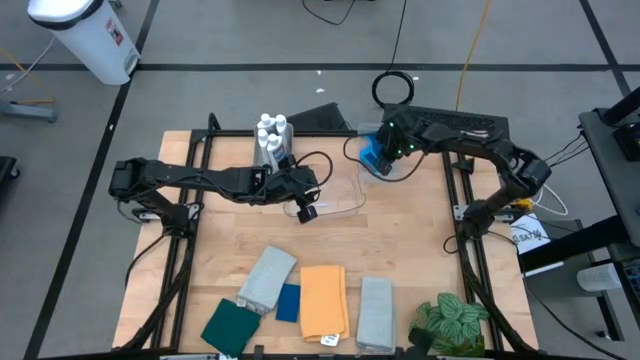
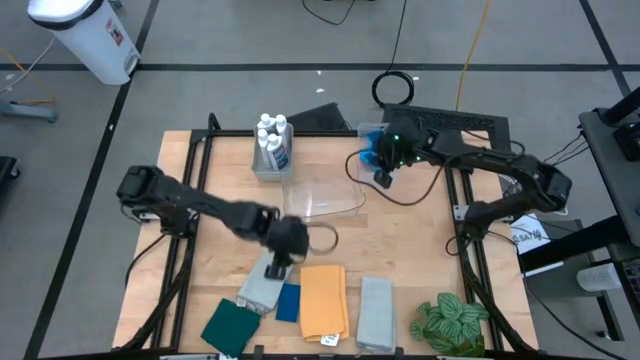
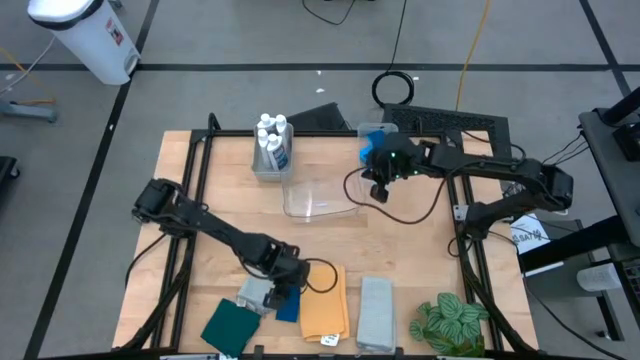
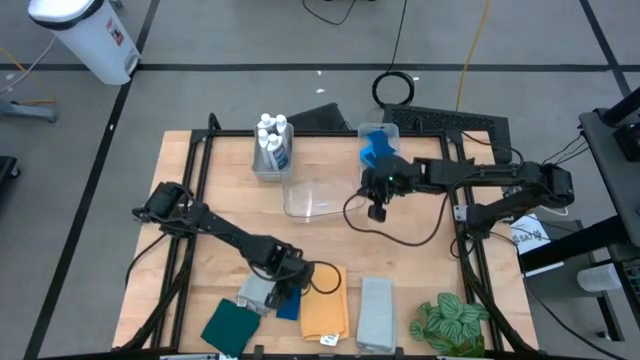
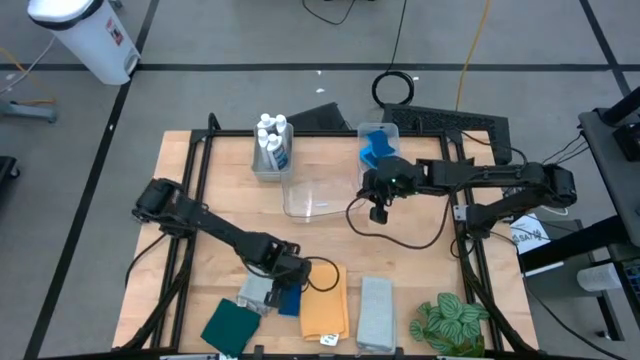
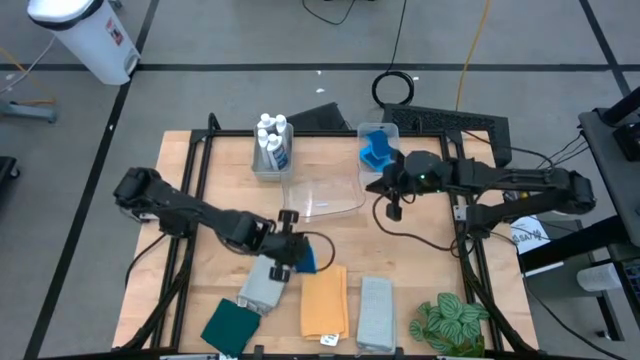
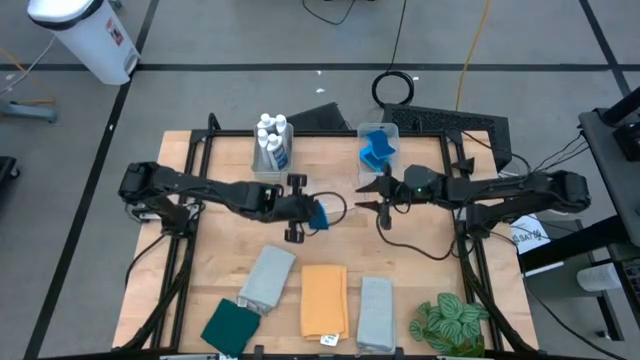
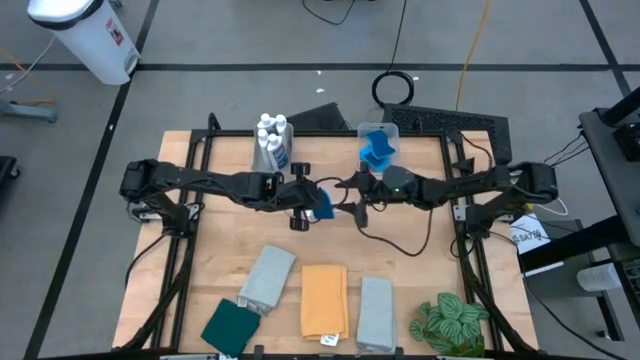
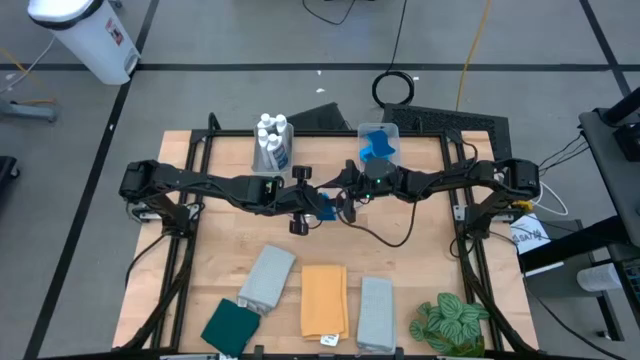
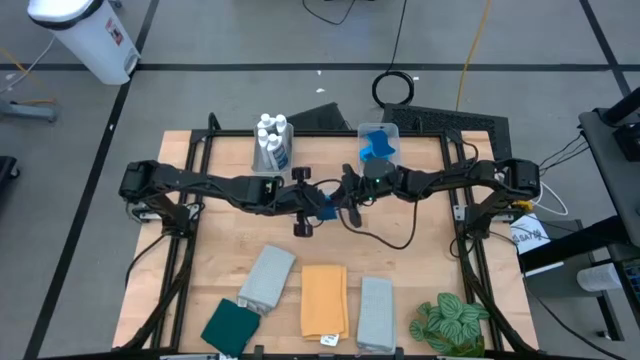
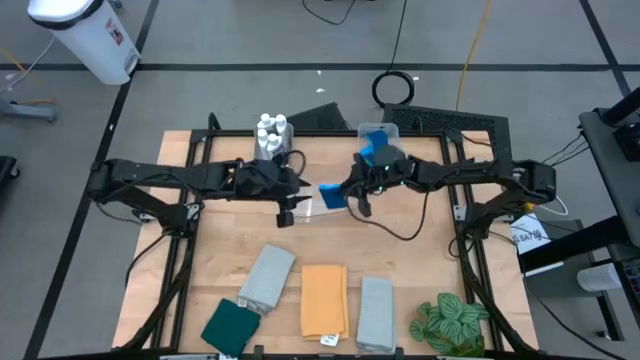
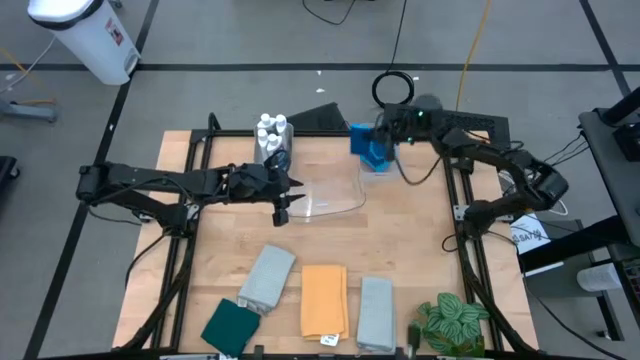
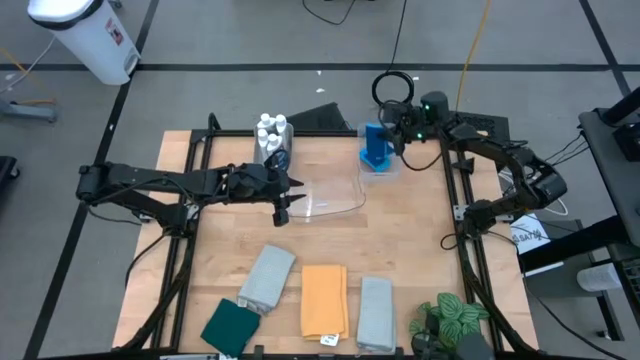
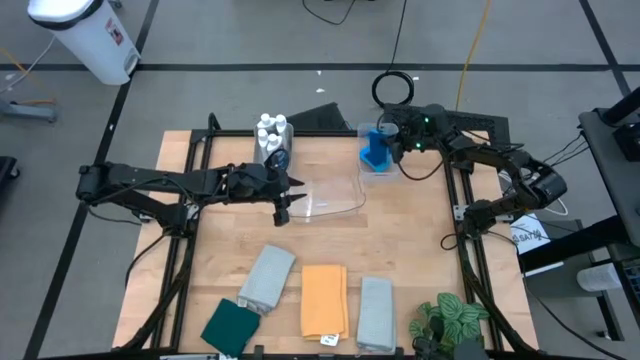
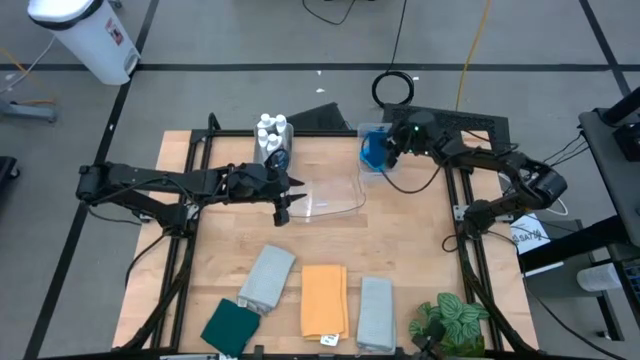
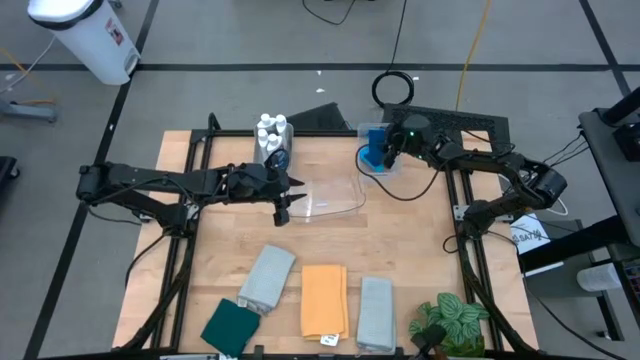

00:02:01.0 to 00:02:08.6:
Task: Pick & Place Kitchen Items
Put the blue sponge into the white bin

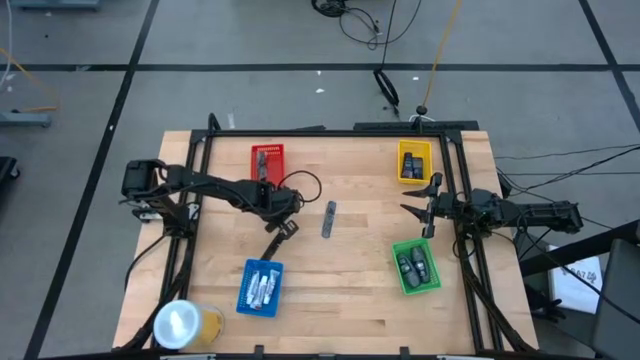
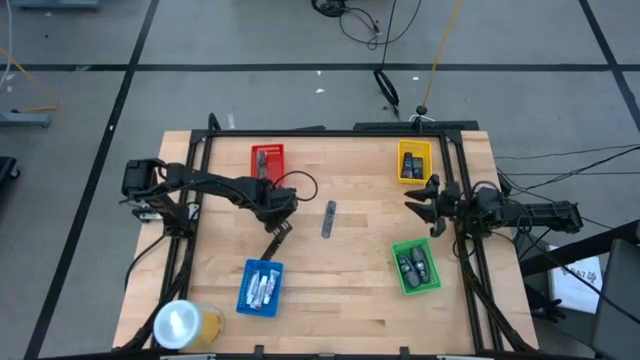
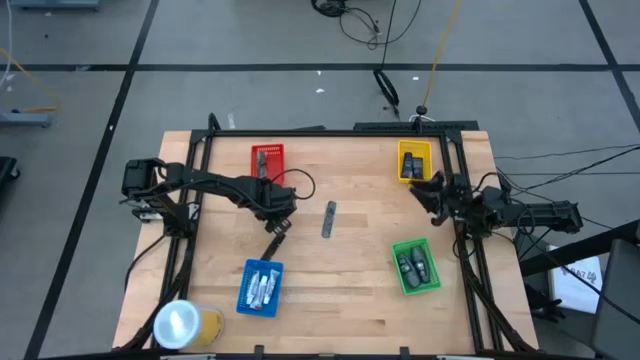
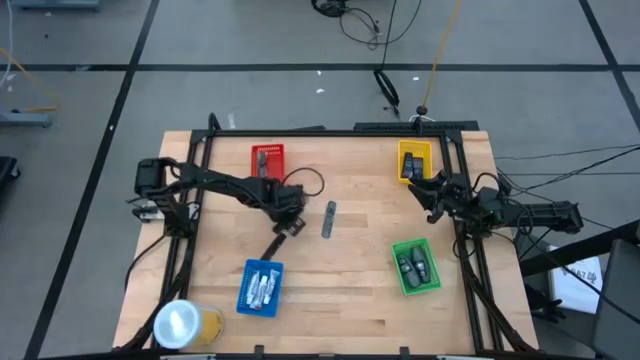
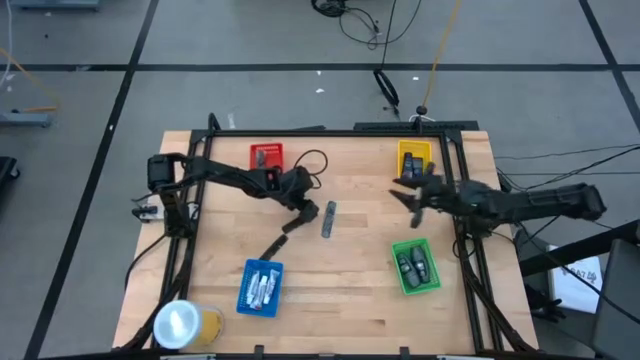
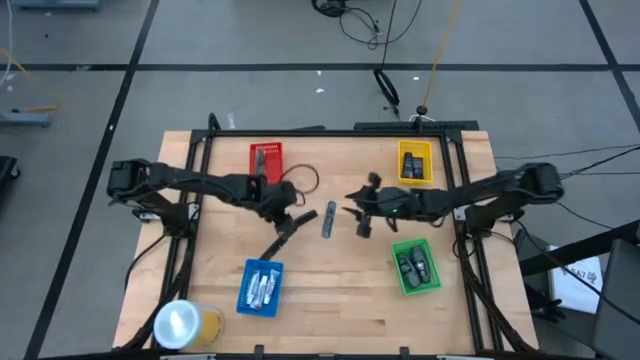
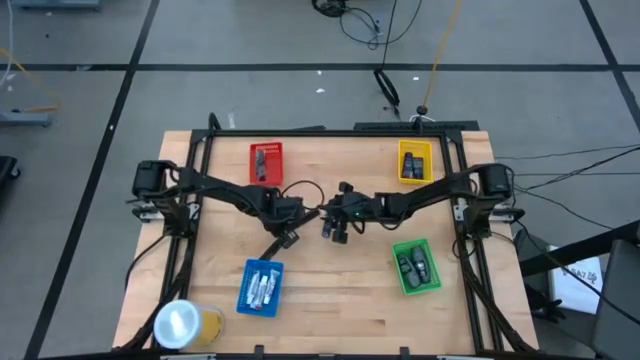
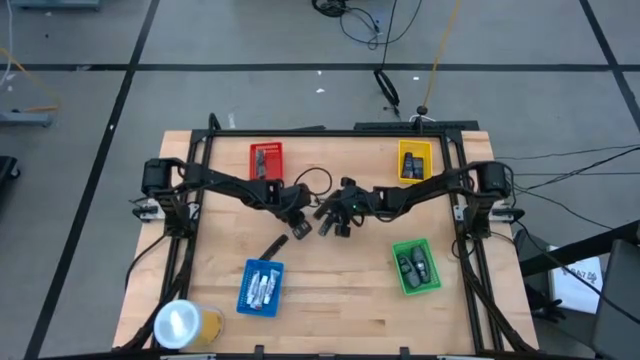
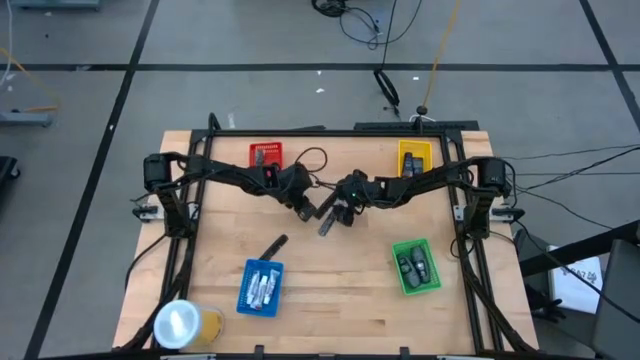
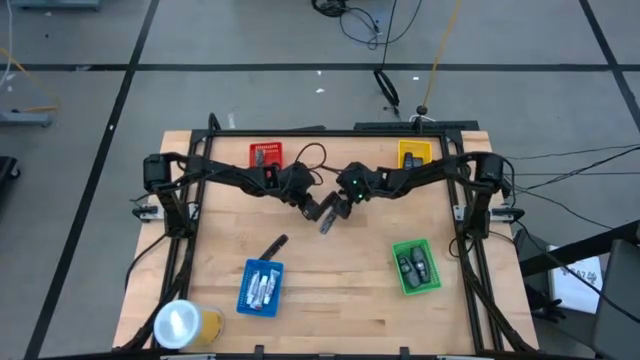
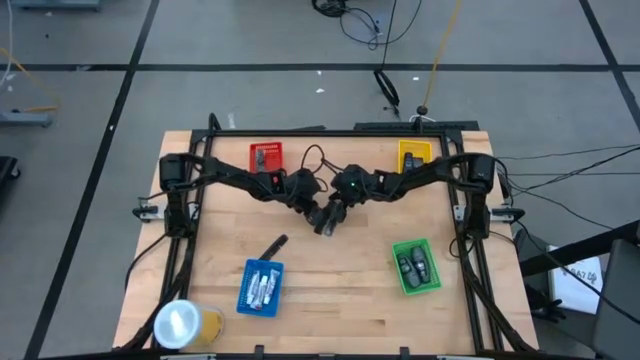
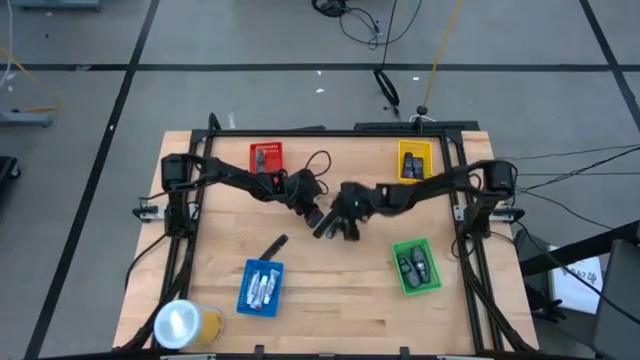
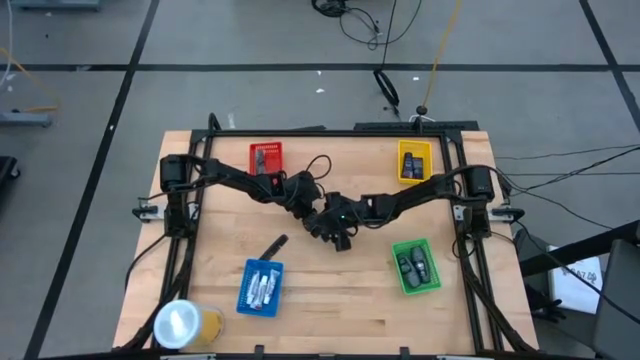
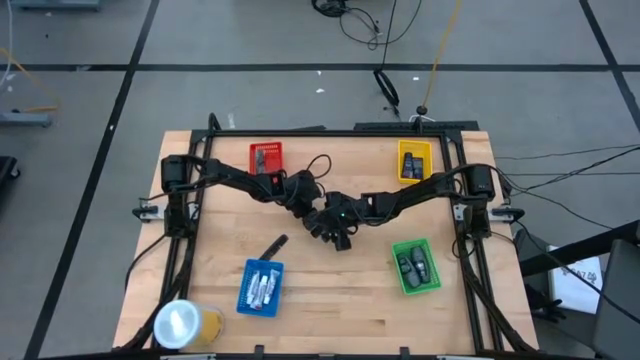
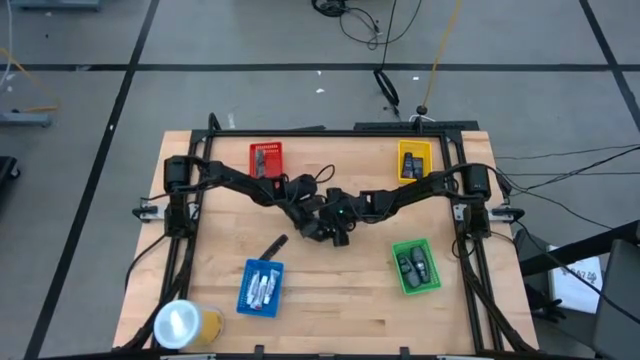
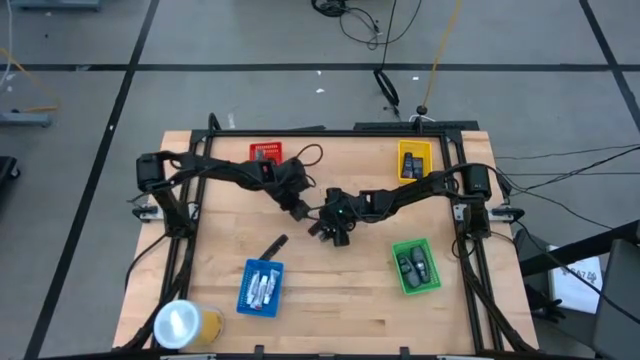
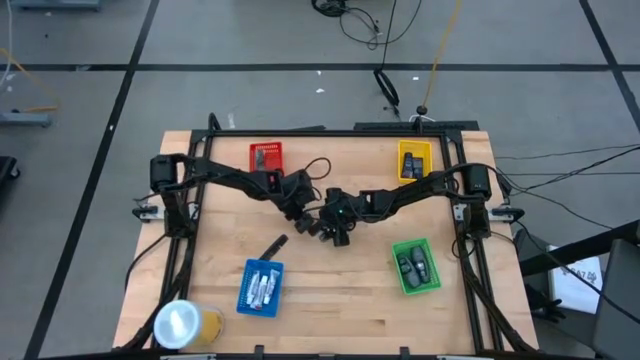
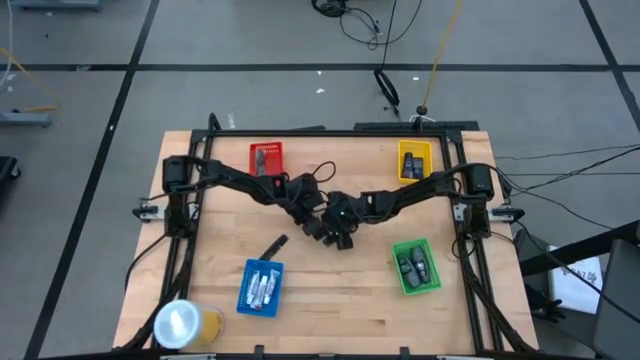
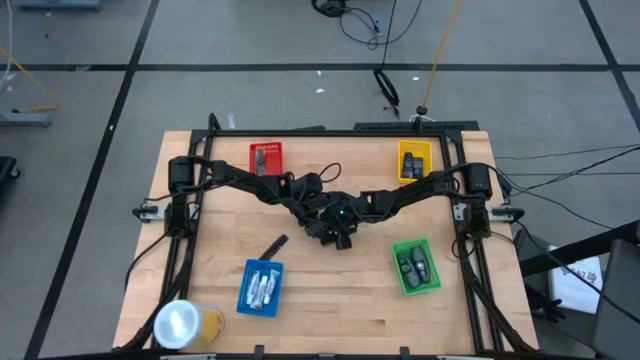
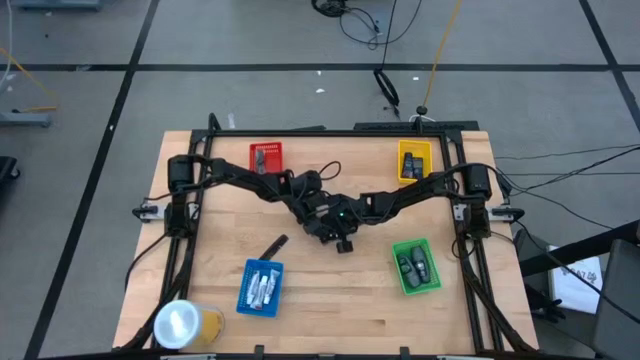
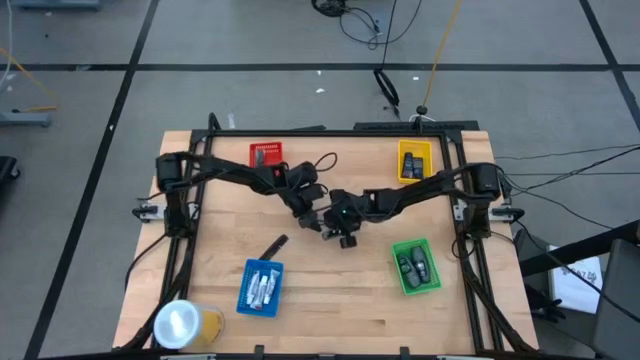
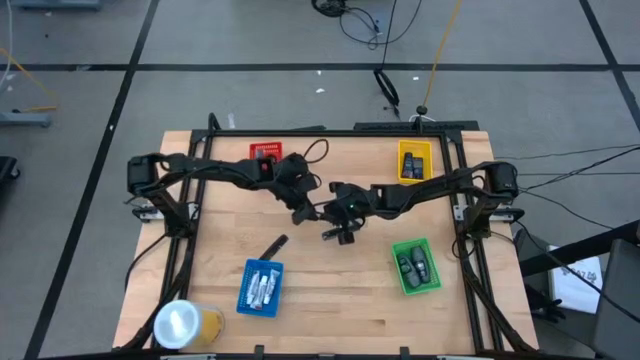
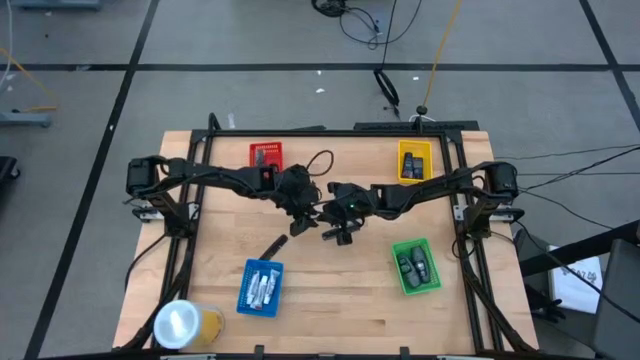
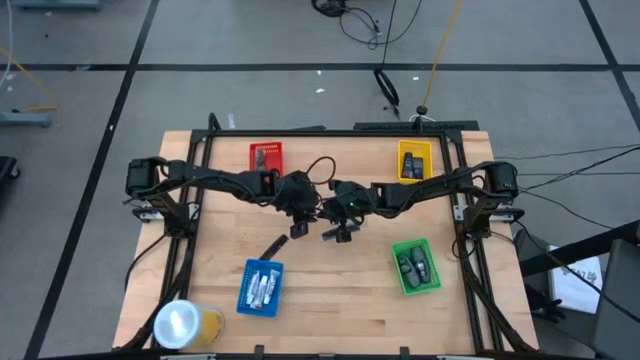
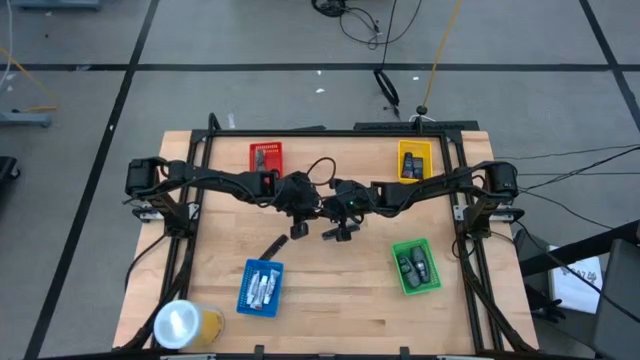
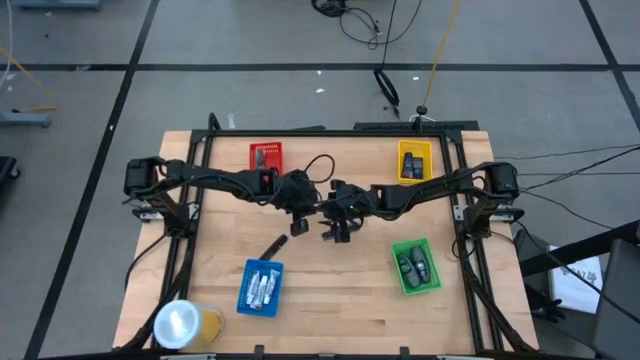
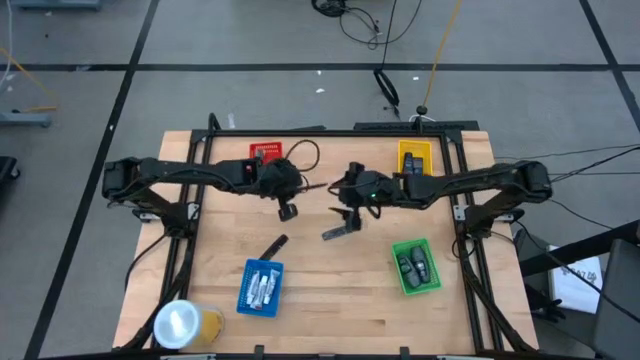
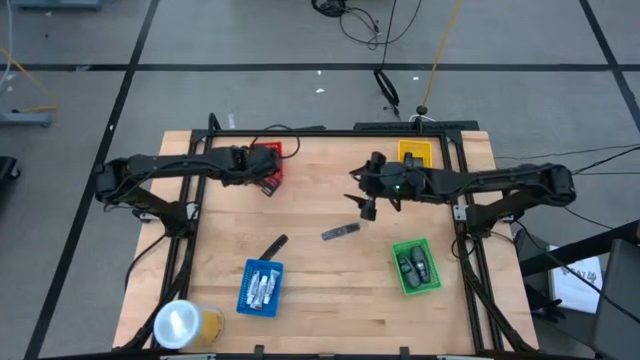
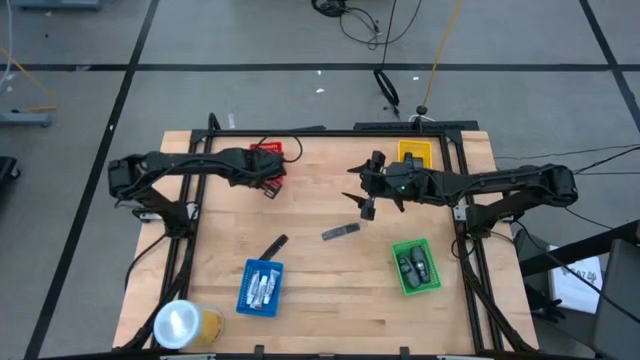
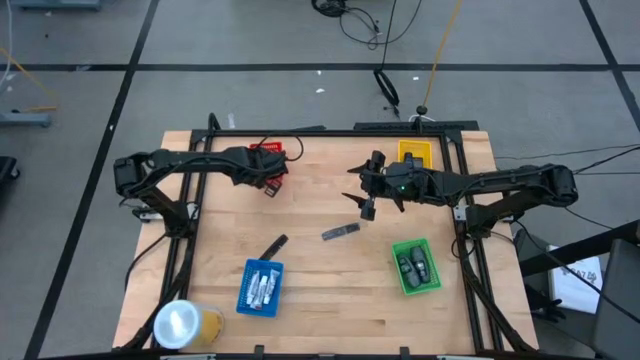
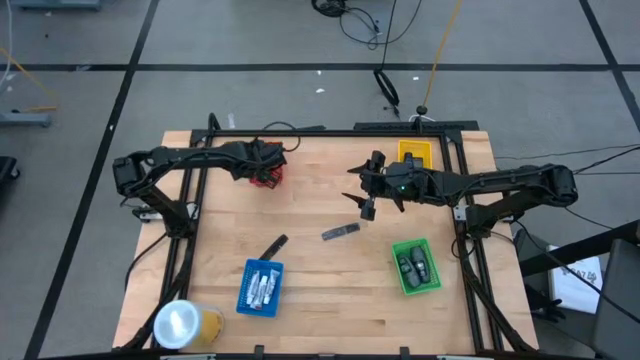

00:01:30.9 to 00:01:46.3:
Task: Pick & Place Travel size toiletries
Put the top left black comb into the orange basket
